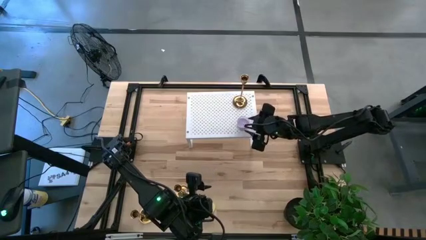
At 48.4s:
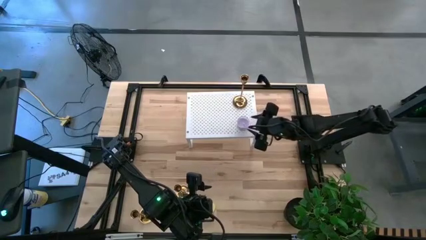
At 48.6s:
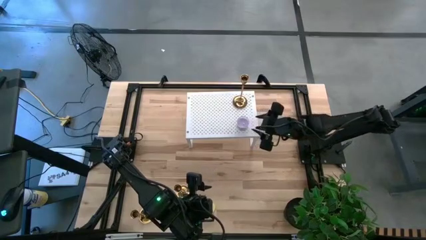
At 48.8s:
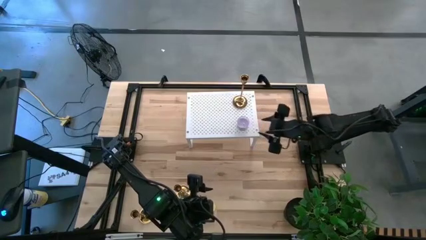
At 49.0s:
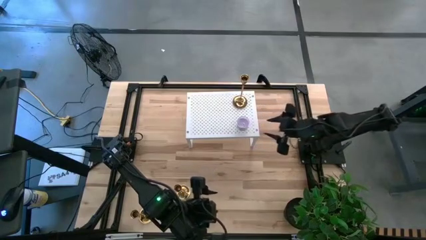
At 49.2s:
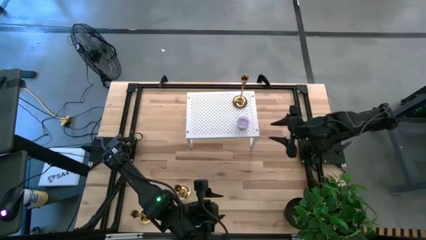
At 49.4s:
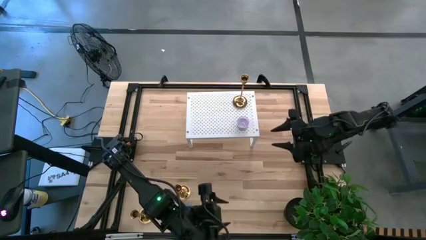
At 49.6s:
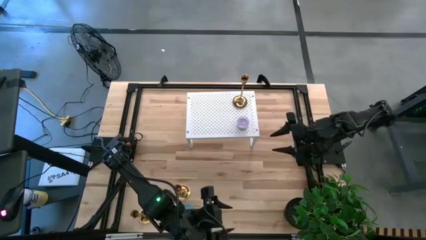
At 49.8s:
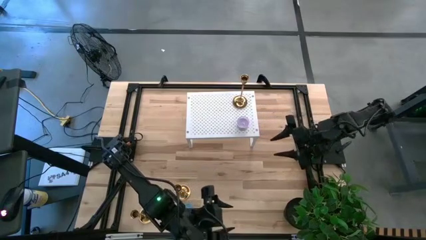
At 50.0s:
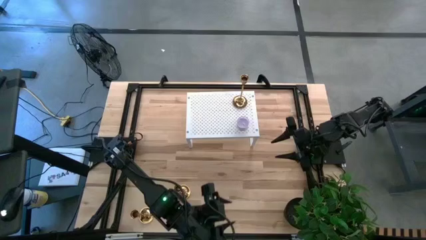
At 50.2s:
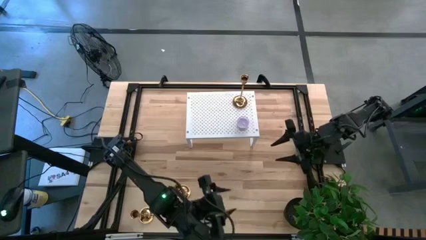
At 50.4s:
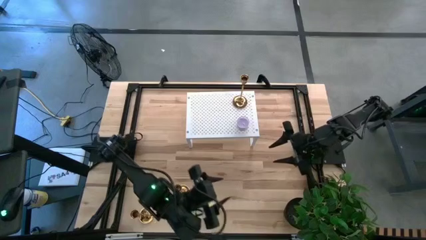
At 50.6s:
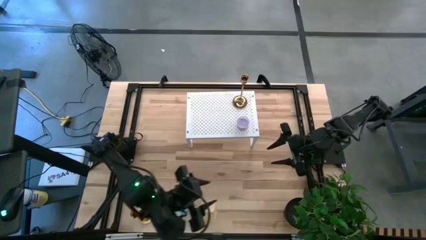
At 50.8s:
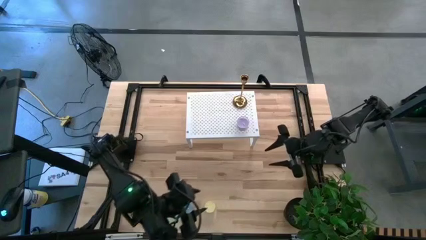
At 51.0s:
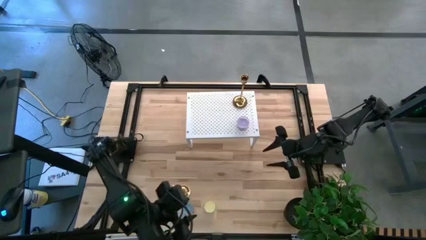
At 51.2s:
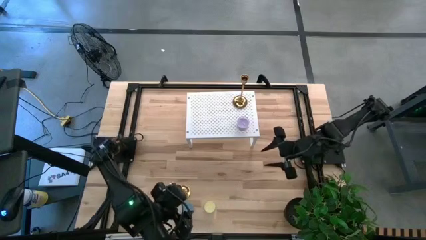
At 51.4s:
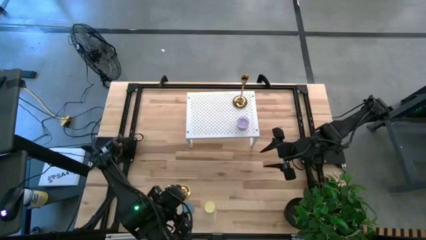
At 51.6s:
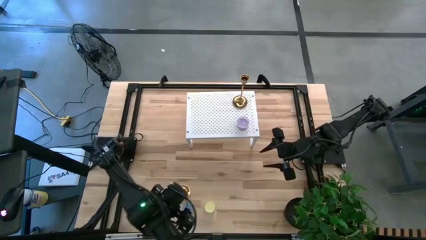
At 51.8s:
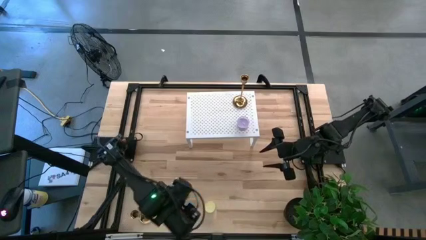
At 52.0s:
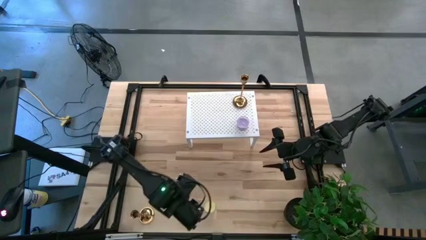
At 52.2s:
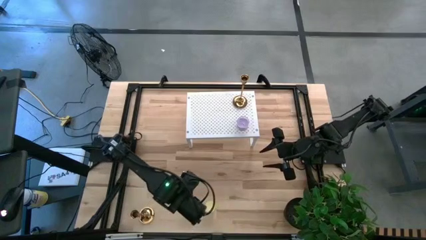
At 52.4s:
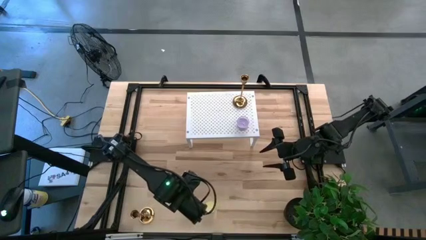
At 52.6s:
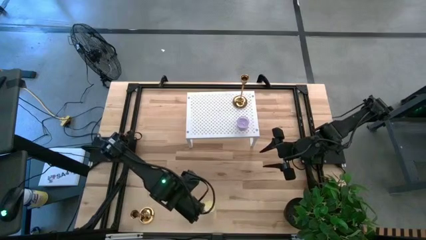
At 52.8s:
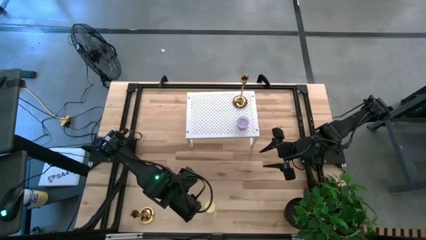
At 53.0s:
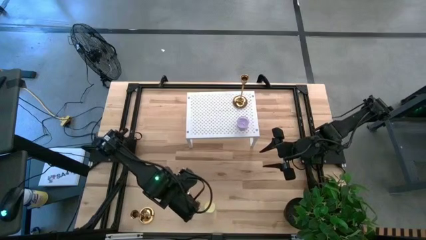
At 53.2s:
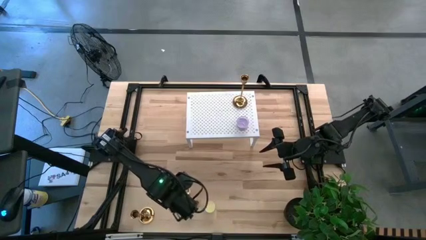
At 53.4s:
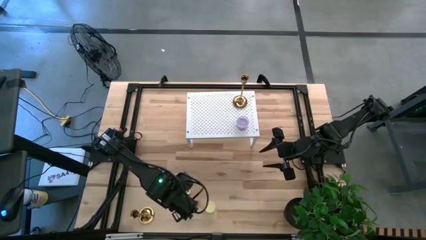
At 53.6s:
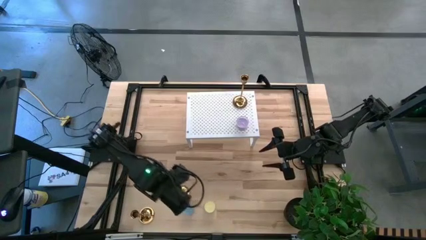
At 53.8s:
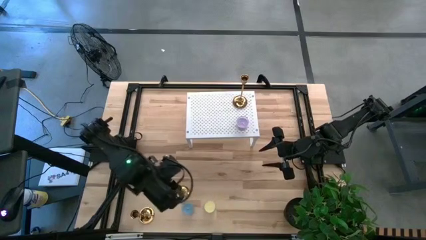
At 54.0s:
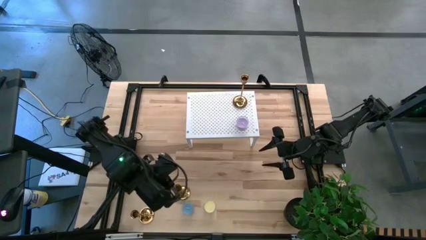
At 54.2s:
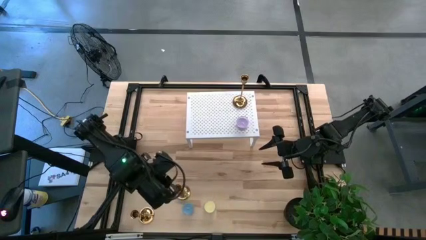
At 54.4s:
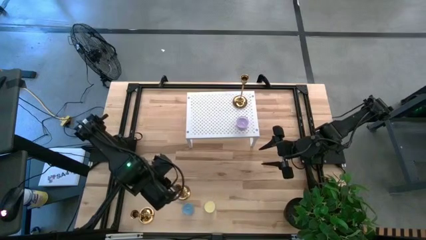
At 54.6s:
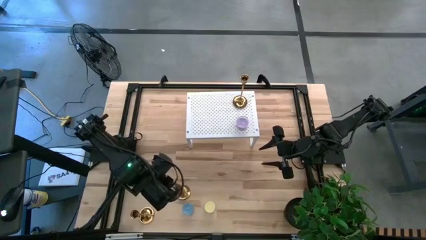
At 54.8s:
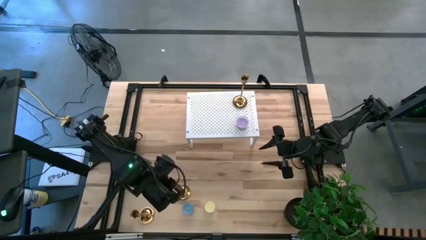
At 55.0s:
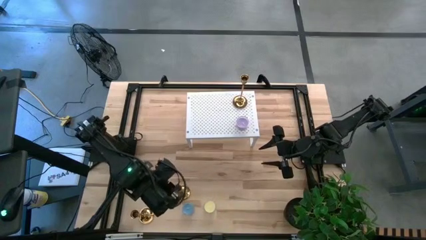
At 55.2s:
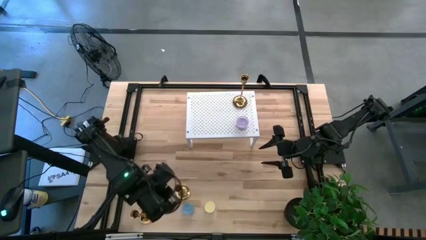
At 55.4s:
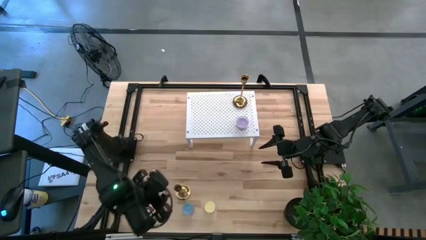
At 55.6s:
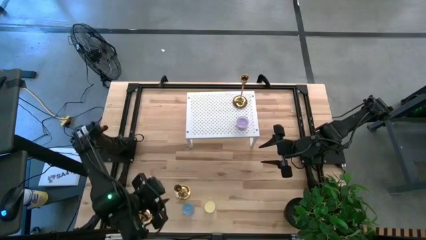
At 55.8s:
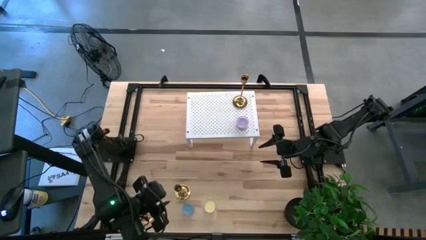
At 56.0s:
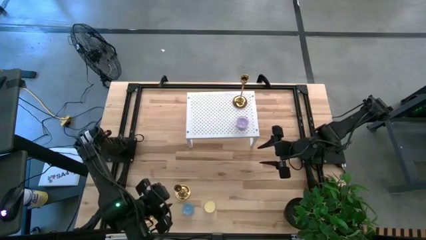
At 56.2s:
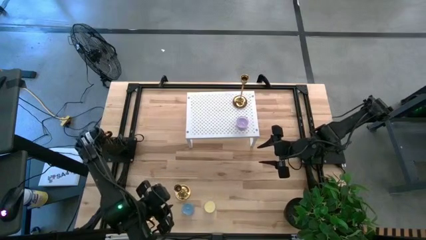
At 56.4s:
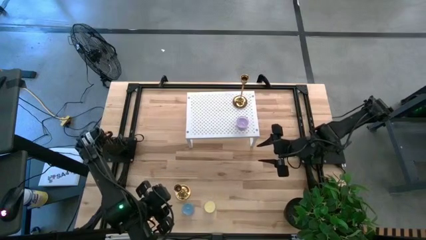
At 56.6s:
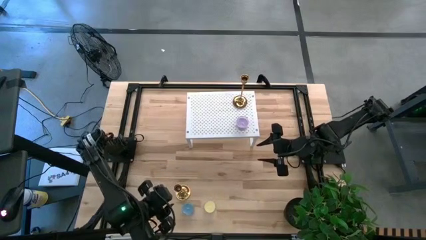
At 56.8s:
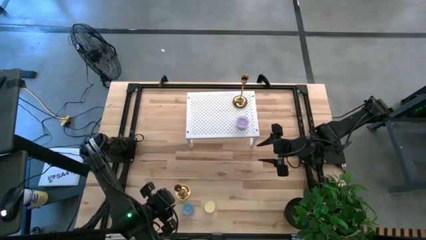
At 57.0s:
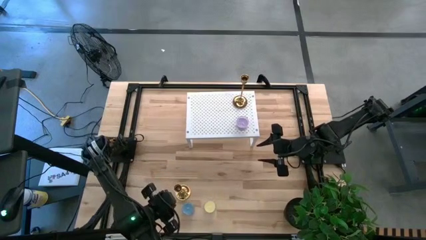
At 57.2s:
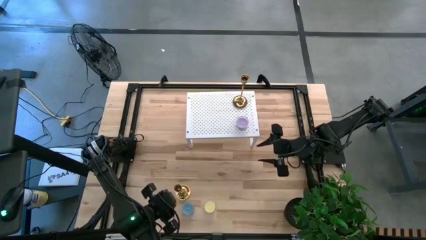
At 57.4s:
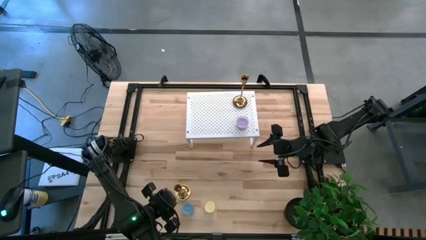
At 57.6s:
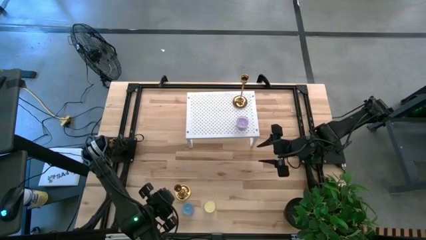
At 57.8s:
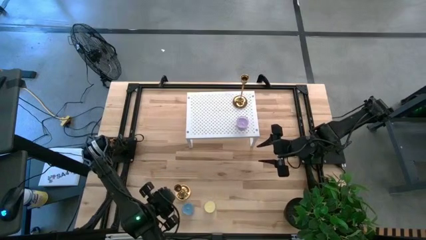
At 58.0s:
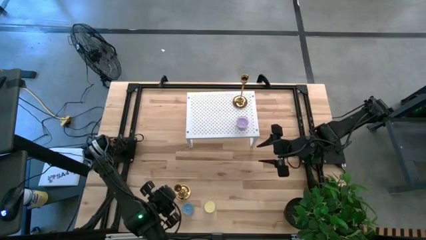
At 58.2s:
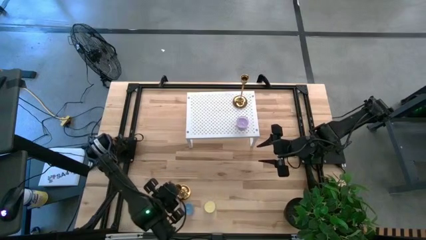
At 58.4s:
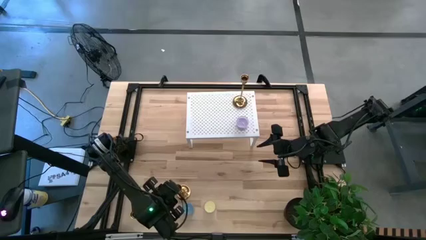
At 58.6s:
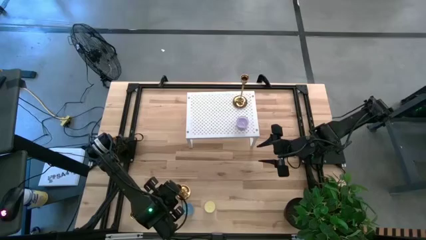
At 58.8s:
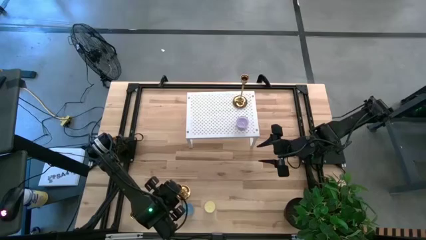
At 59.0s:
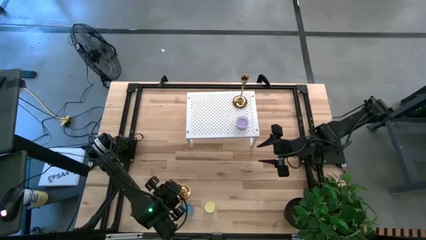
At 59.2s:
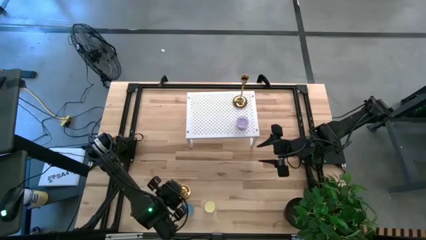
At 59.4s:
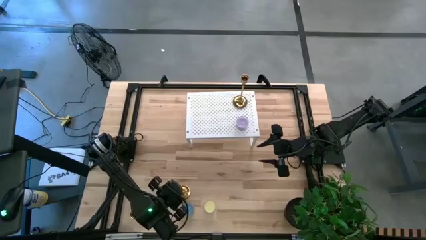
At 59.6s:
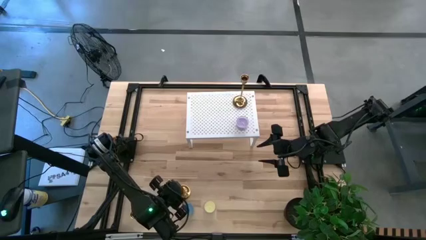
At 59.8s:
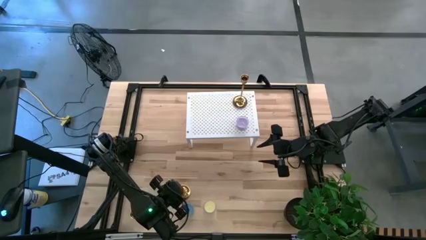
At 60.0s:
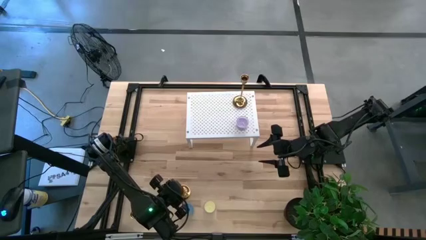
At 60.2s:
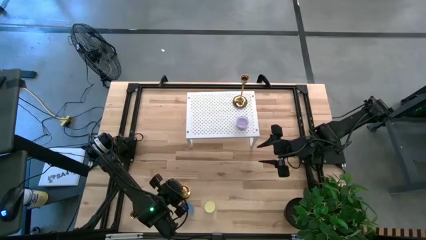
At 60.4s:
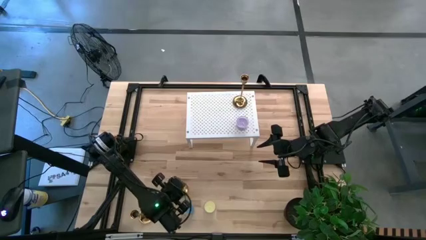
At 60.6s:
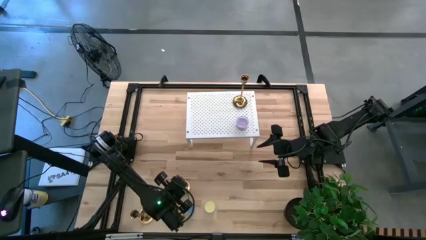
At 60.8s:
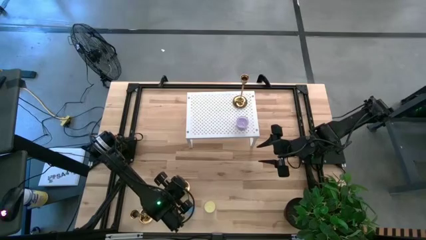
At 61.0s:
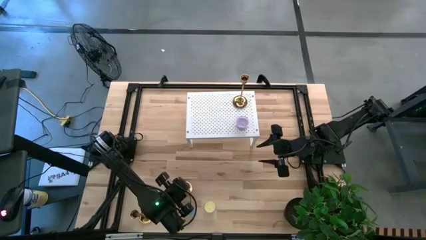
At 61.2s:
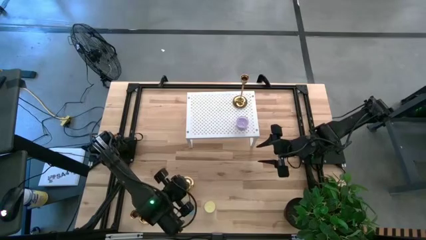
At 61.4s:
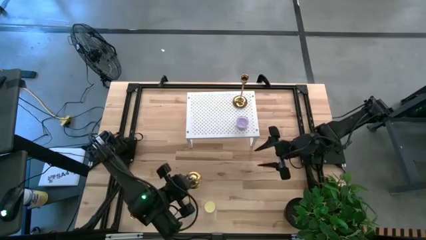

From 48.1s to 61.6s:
Task: Pick & Place candle stick holders
Put the right gold candle holder on the shelf
